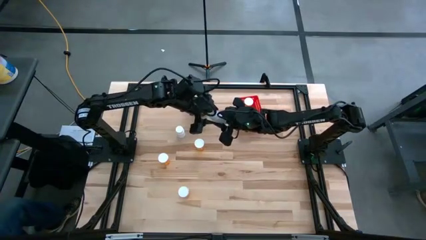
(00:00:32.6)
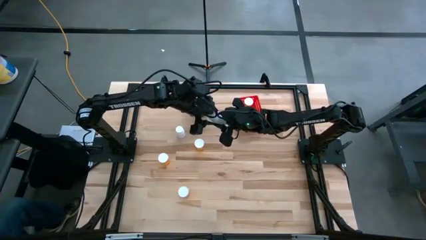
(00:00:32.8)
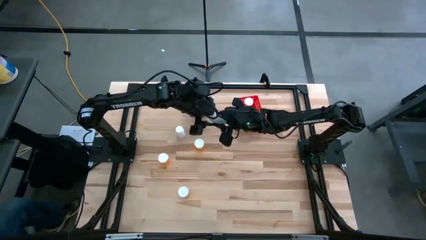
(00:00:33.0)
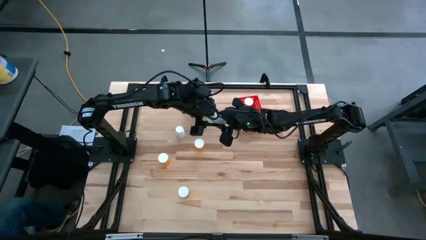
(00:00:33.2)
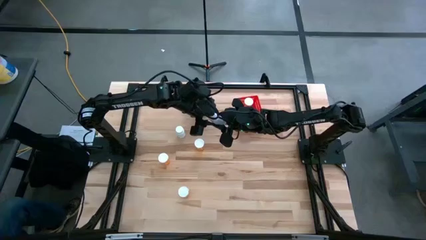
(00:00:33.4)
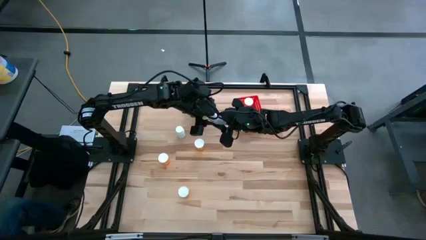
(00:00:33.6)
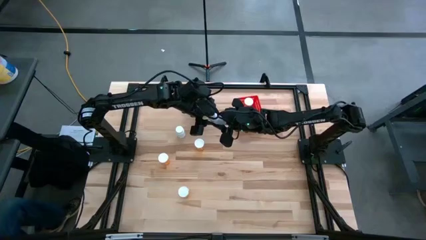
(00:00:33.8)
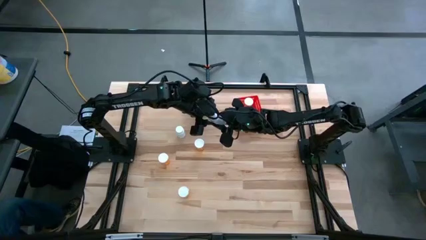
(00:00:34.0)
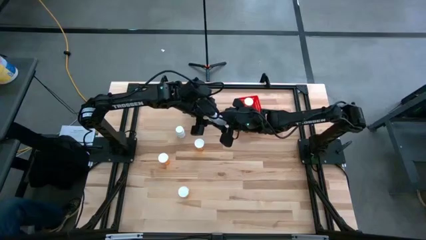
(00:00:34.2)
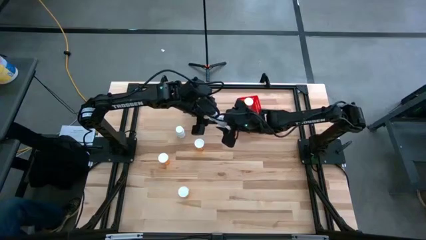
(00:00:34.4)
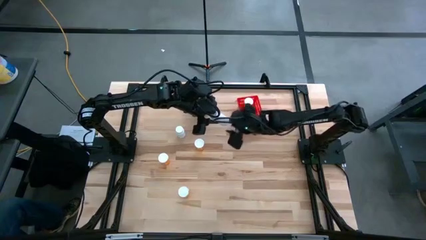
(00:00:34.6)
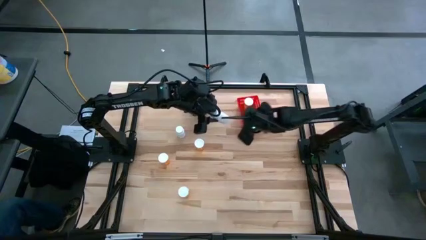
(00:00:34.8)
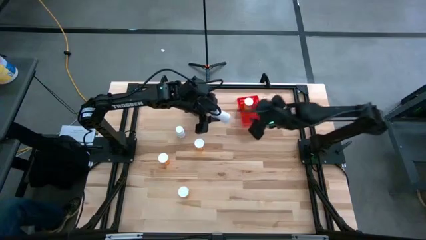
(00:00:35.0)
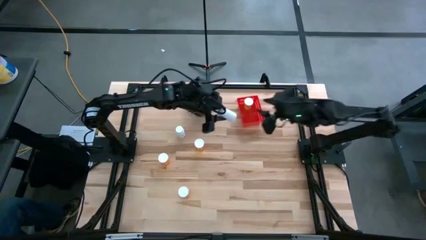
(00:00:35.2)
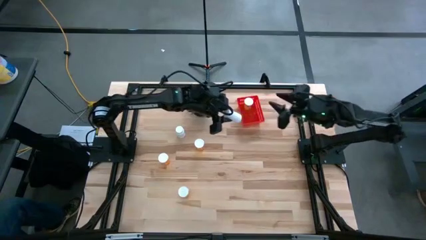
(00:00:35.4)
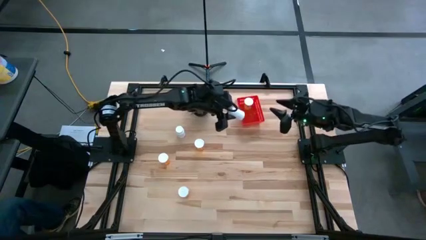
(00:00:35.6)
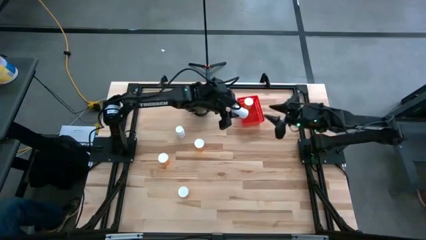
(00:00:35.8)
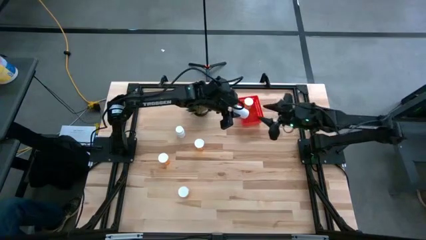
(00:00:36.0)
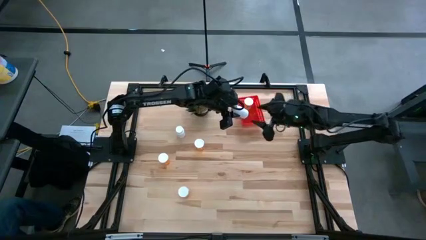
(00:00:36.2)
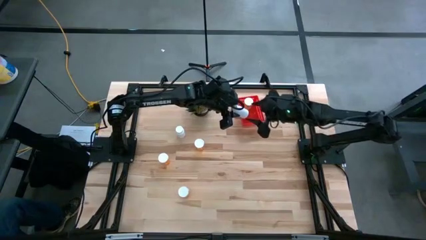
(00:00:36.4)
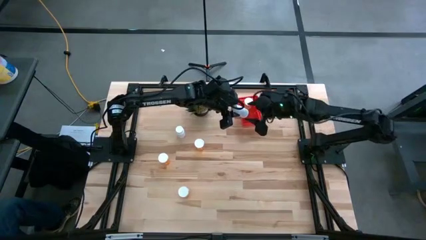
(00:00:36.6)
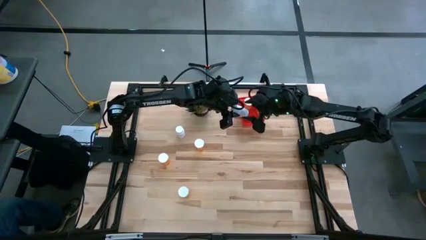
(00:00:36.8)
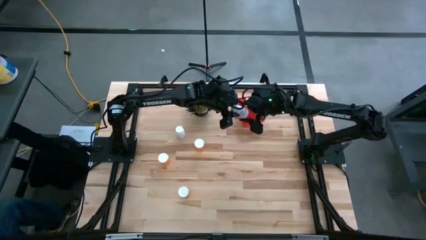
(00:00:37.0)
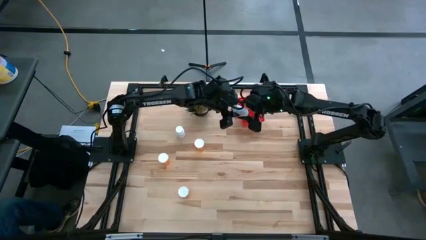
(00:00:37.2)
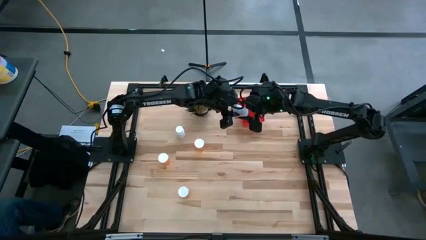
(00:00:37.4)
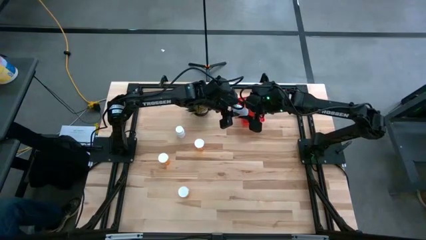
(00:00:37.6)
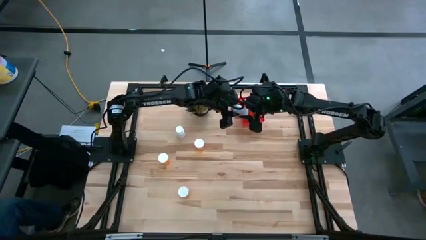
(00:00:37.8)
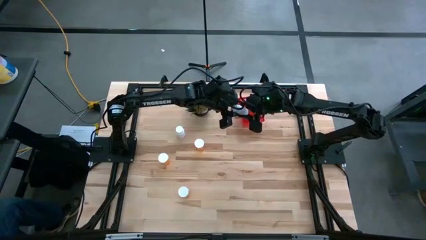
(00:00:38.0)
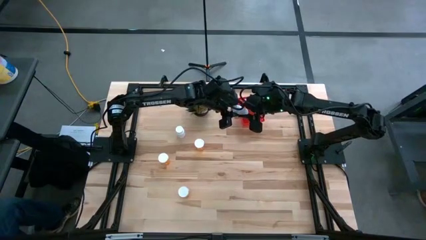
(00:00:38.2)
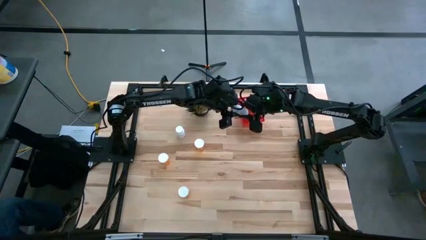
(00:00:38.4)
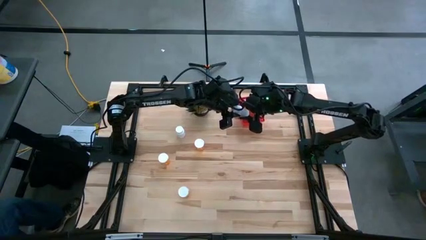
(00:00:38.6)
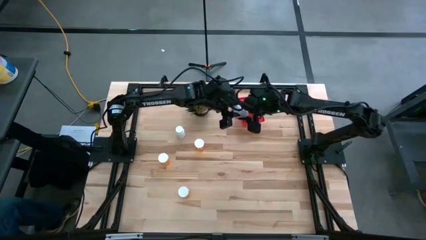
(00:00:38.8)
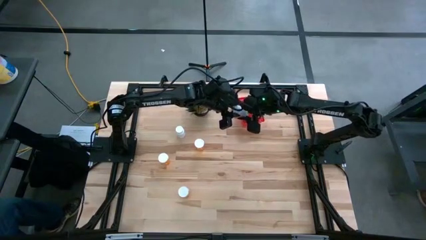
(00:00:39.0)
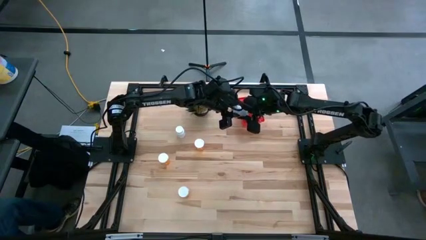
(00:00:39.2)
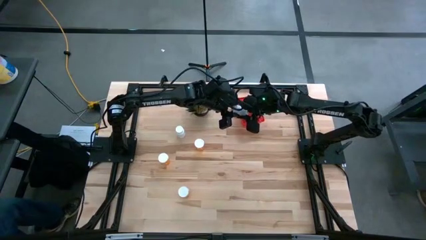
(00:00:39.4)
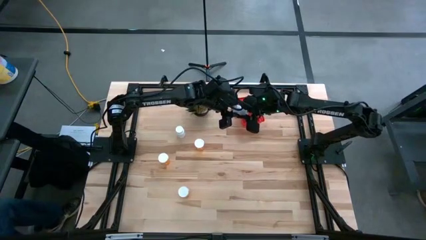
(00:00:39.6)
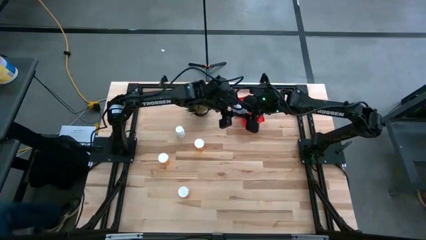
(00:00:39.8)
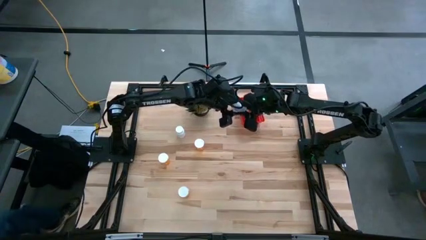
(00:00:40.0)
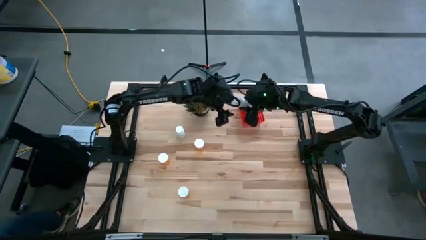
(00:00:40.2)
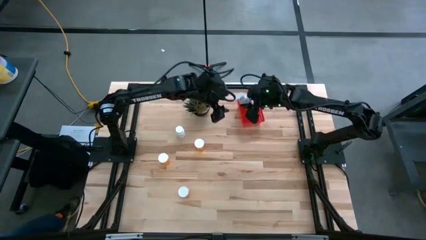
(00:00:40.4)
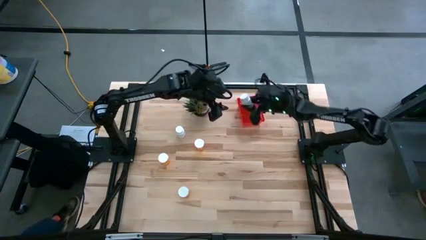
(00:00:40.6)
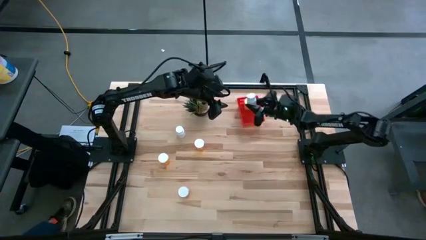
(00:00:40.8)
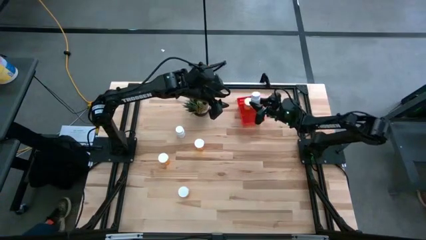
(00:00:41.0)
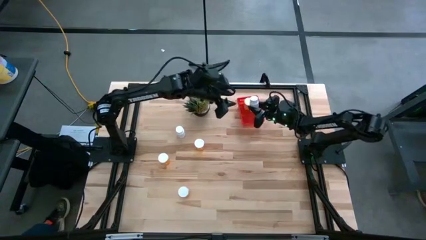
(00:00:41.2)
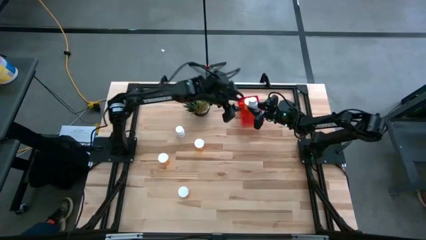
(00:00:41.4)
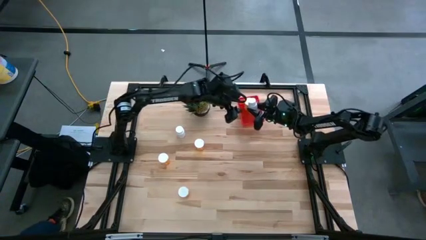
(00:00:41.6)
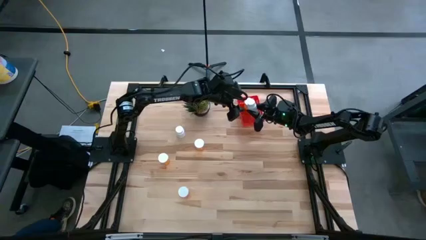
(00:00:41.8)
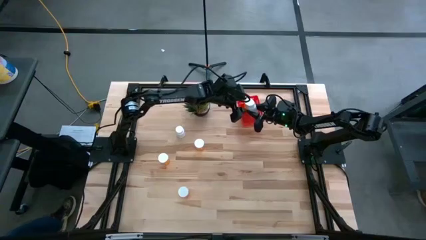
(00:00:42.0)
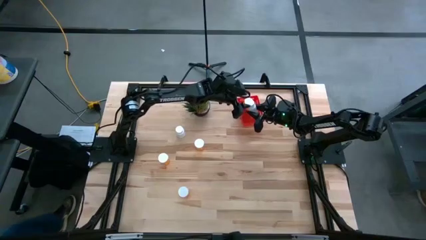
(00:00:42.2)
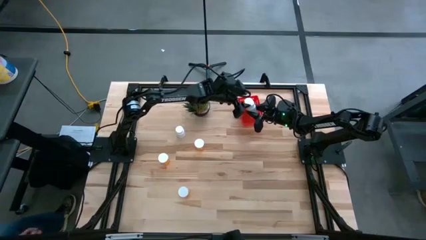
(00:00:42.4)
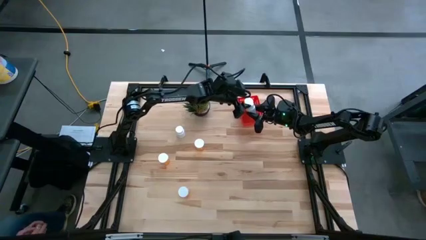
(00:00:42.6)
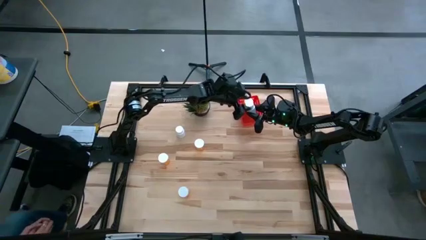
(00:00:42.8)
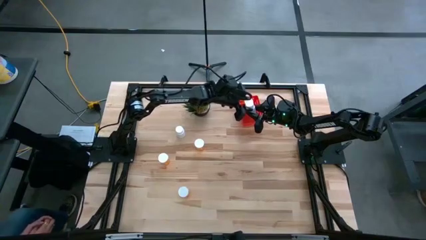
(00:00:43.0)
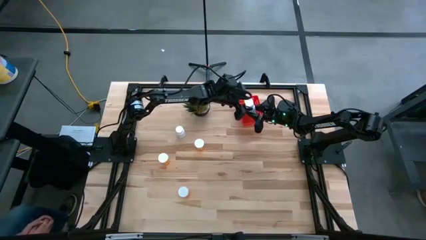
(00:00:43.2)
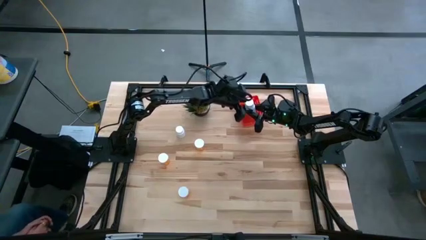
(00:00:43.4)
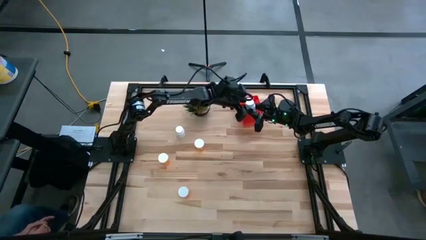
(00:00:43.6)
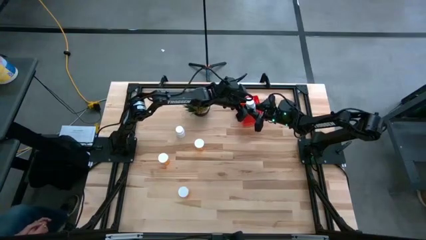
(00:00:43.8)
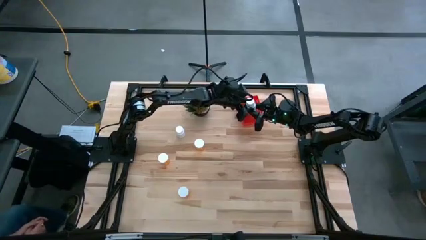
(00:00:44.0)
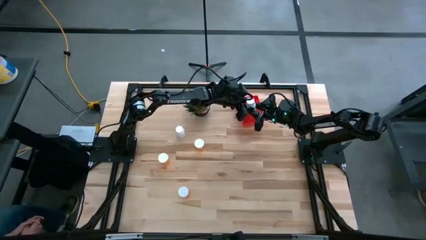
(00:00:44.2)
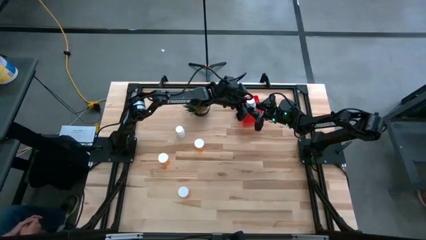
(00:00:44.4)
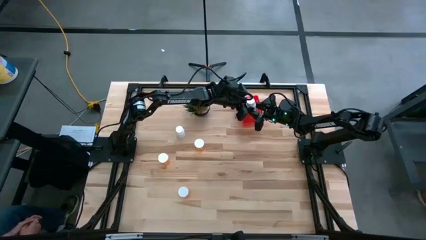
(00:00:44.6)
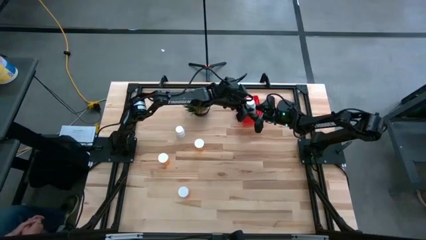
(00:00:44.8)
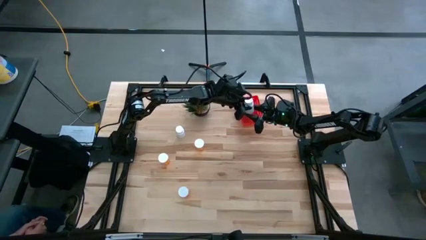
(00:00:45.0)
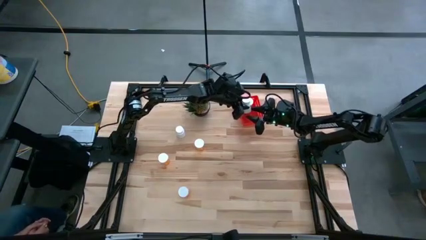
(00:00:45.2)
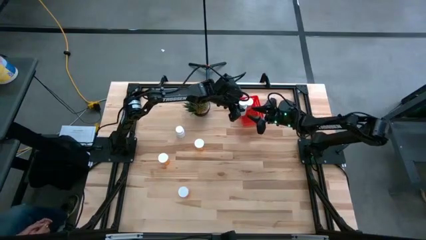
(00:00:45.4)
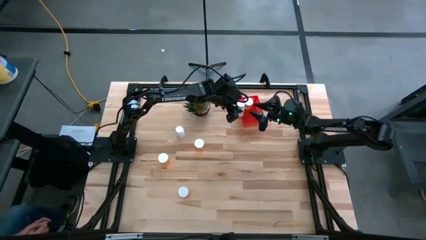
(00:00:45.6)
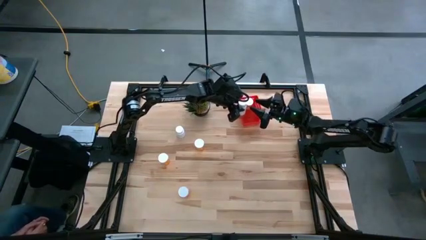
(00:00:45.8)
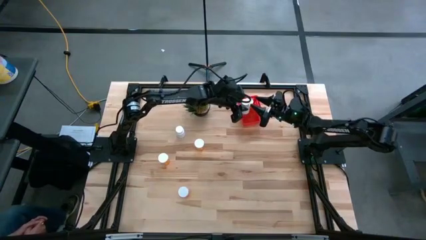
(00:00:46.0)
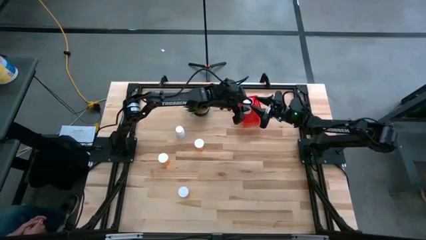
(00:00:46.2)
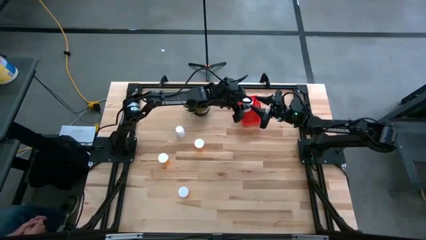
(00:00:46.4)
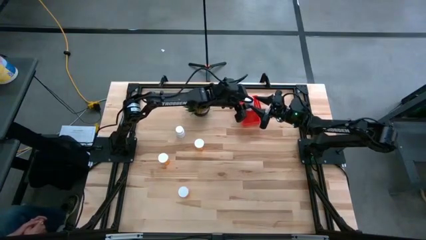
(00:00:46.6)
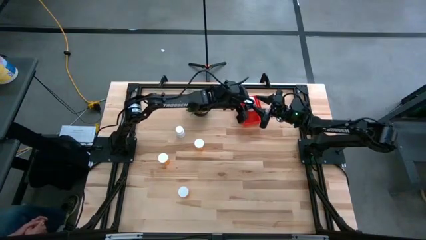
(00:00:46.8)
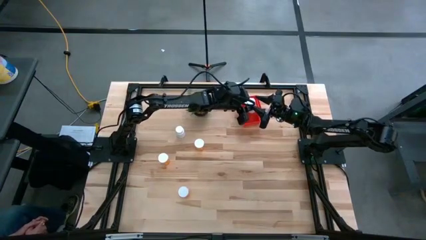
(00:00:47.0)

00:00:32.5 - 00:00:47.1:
Task: Pick and place pill bottles into a basket
Put the top white pill bottle into the bin

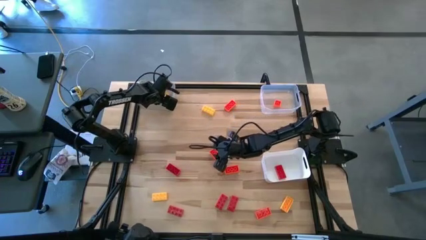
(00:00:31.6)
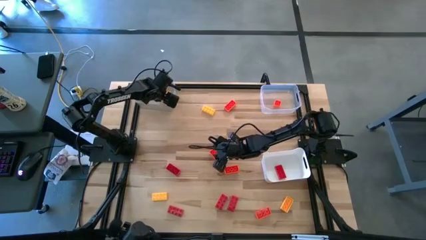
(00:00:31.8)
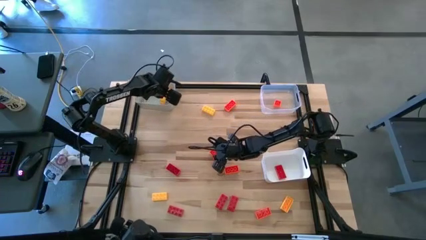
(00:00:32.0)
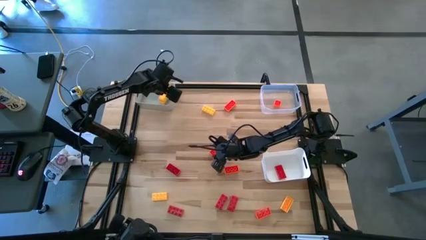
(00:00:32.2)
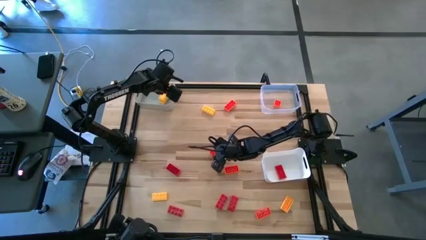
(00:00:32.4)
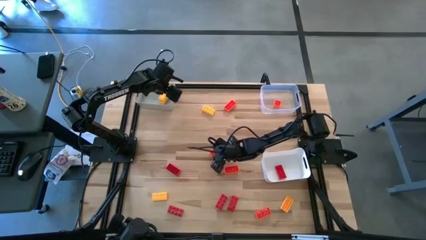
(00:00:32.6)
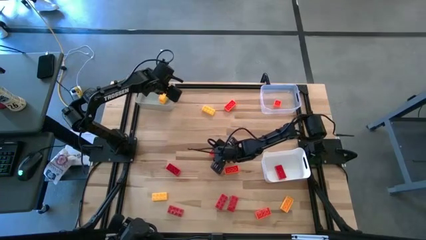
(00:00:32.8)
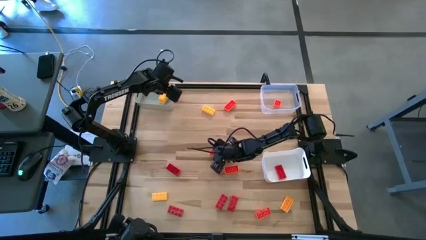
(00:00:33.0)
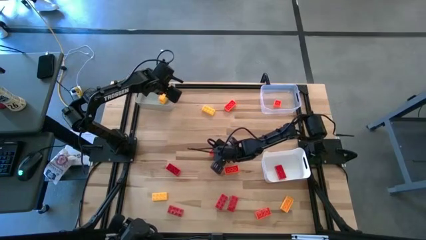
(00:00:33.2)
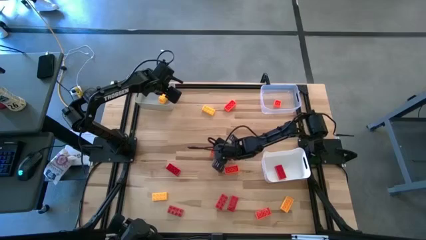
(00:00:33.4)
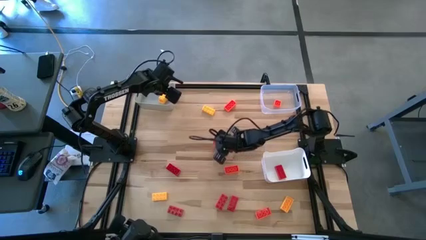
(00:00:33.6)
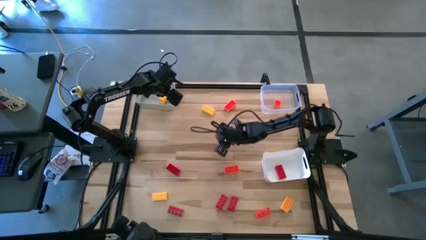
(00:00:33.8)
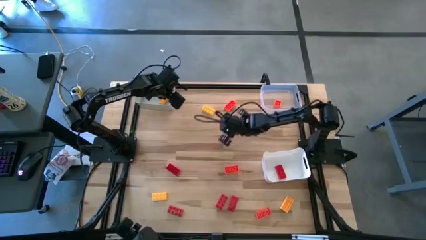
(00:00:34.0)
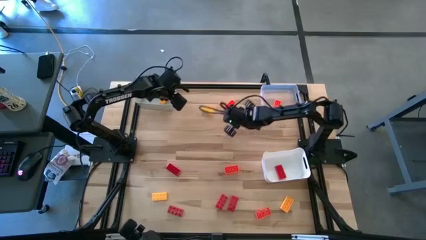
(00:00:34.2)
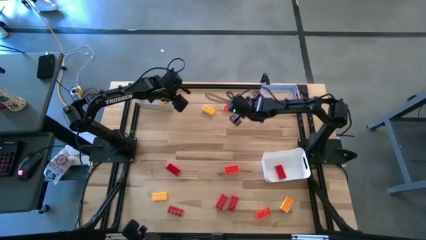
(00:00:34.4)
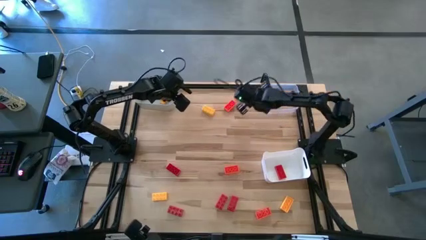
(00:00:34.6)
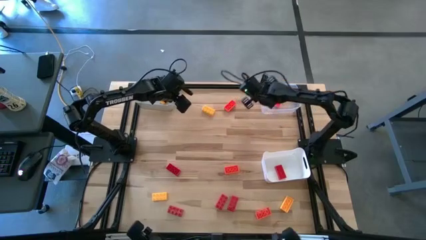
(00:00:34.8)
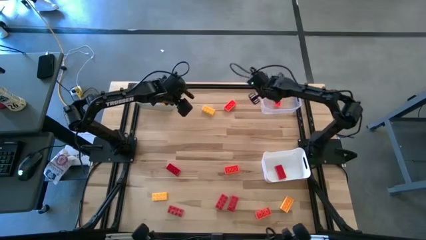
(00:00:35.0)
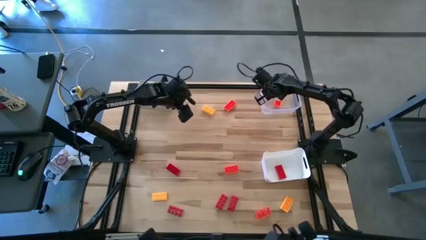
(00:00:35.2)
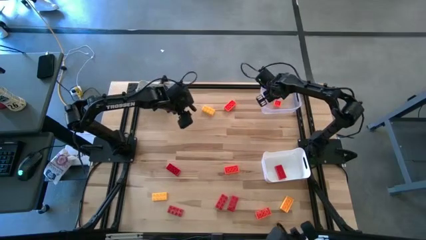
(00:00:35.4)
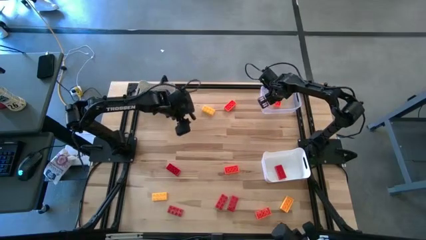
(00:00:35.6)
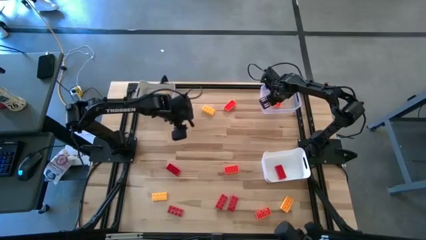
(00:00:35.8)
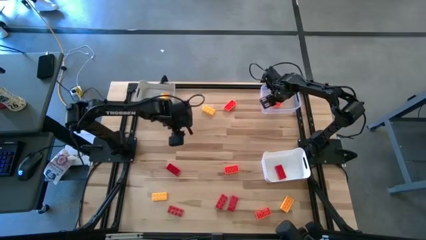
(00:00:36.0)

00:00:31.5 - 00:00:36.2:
Task: Sort & place blocks by color
Put the orange block into the transparent bin
